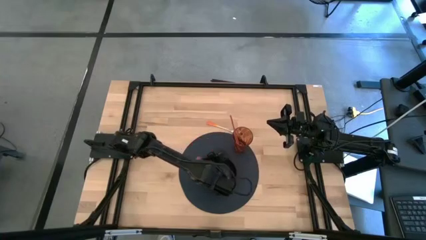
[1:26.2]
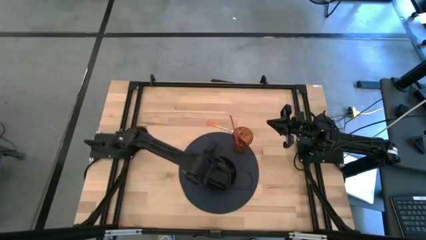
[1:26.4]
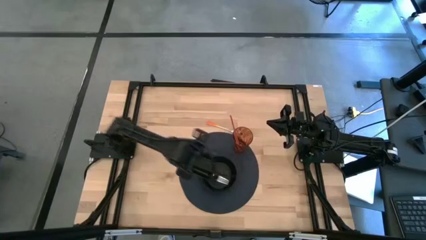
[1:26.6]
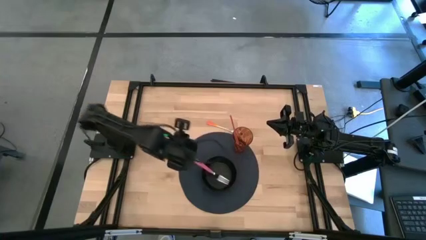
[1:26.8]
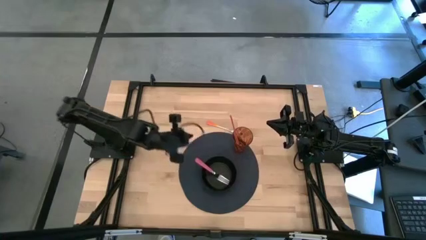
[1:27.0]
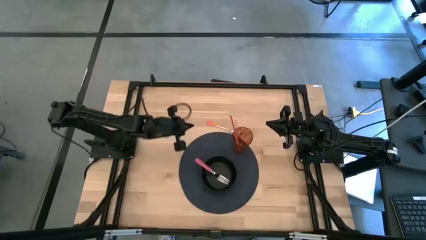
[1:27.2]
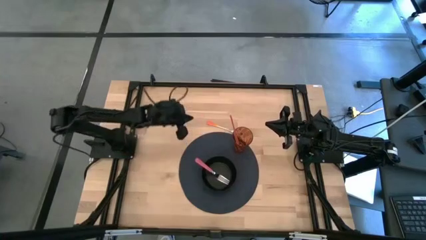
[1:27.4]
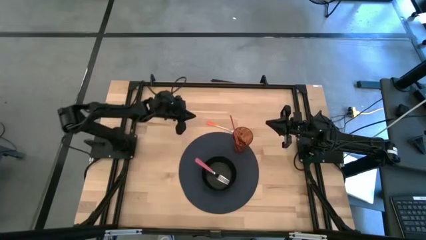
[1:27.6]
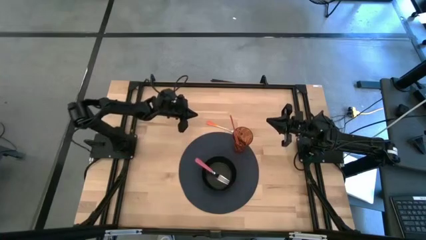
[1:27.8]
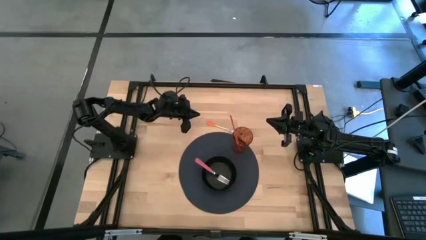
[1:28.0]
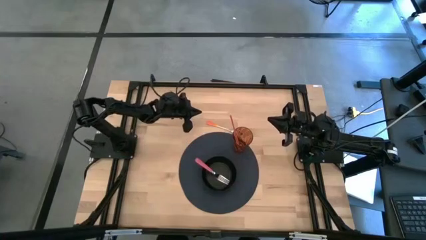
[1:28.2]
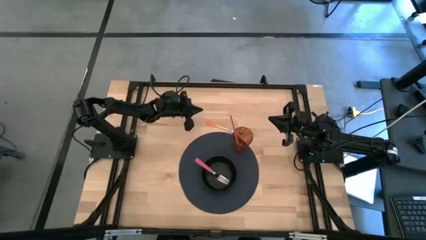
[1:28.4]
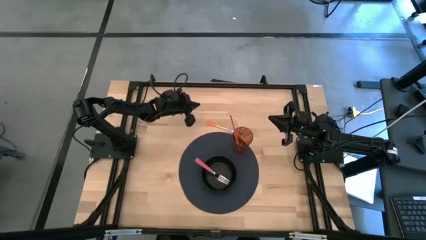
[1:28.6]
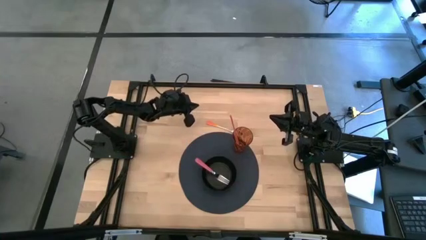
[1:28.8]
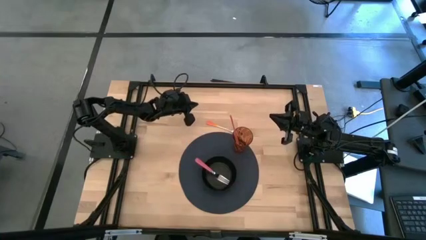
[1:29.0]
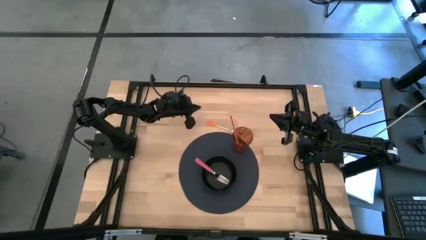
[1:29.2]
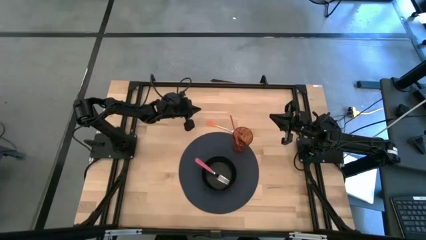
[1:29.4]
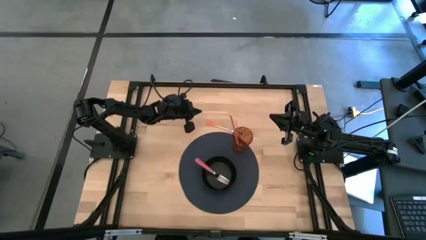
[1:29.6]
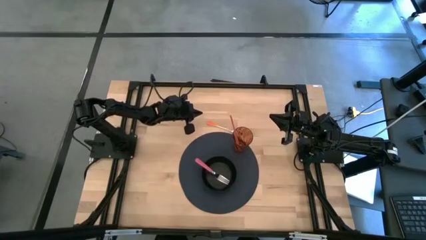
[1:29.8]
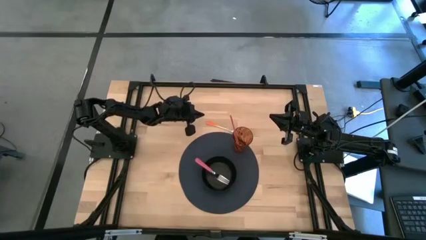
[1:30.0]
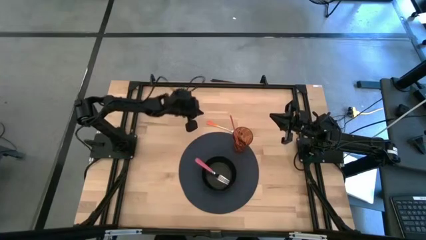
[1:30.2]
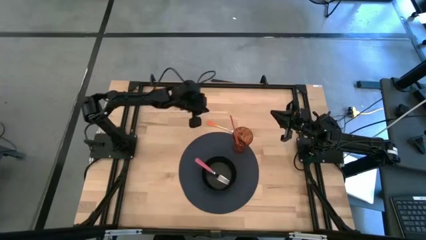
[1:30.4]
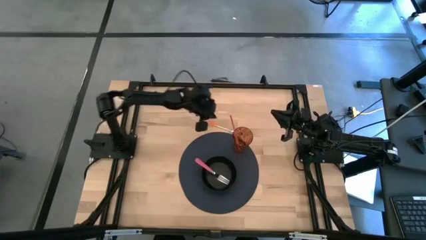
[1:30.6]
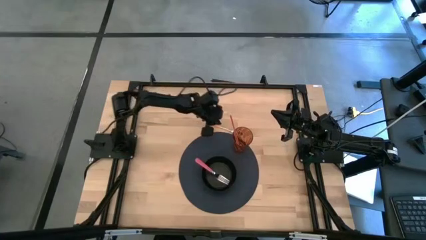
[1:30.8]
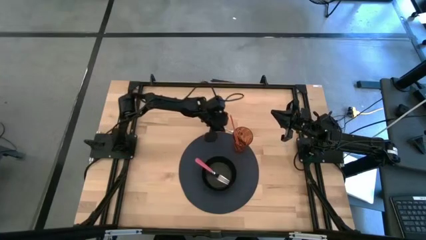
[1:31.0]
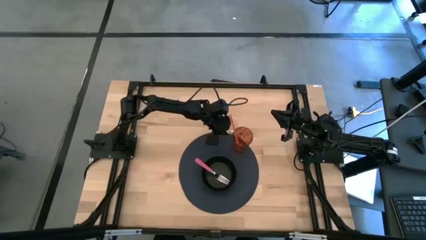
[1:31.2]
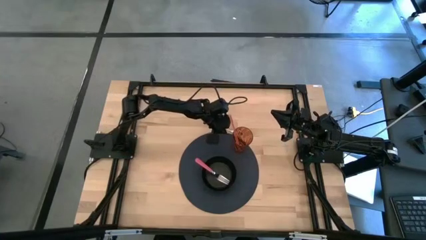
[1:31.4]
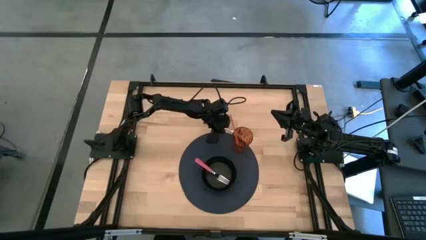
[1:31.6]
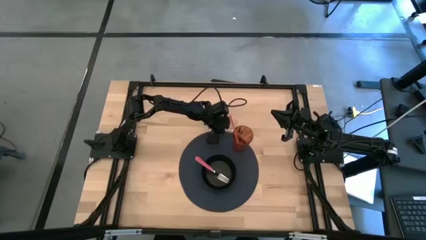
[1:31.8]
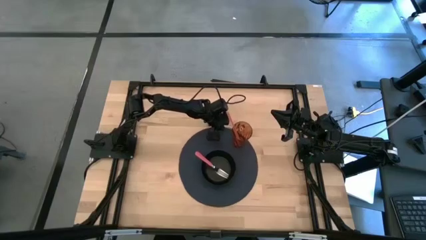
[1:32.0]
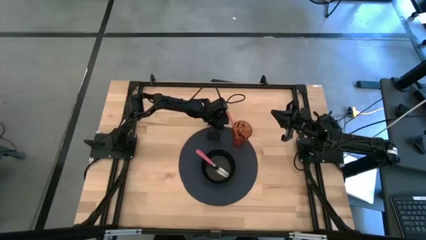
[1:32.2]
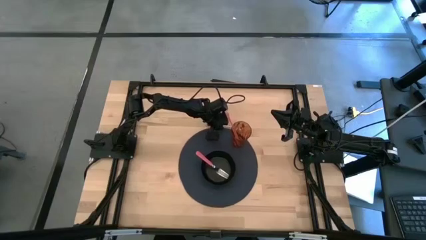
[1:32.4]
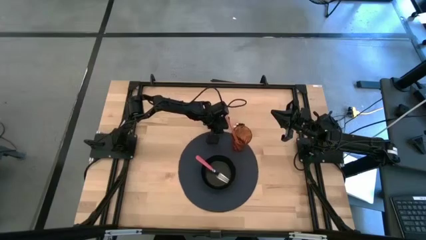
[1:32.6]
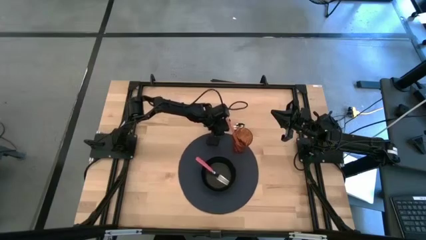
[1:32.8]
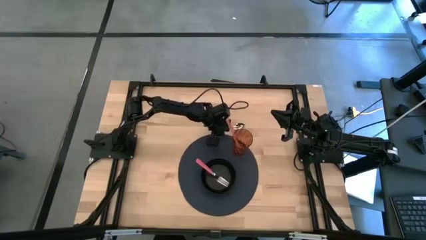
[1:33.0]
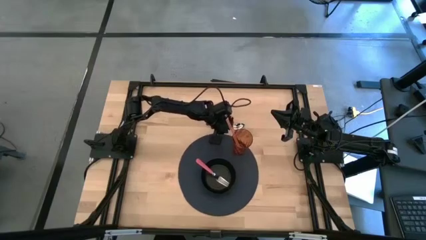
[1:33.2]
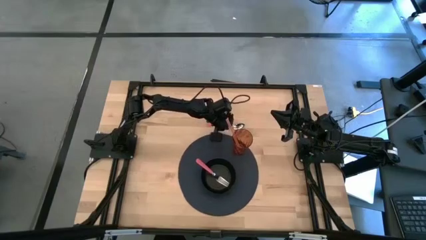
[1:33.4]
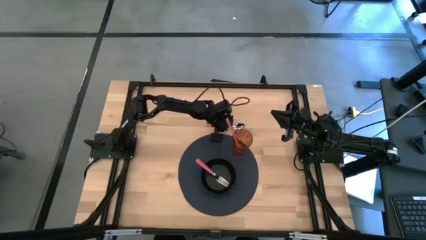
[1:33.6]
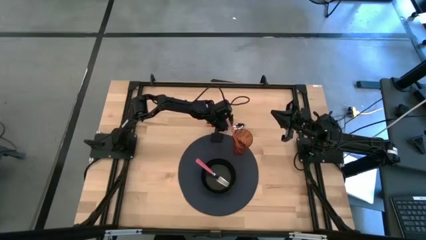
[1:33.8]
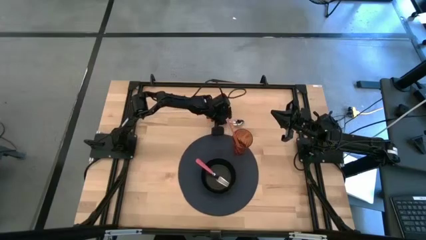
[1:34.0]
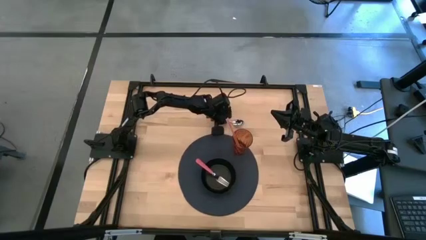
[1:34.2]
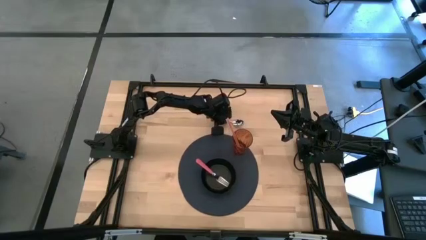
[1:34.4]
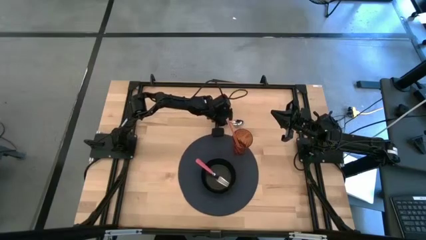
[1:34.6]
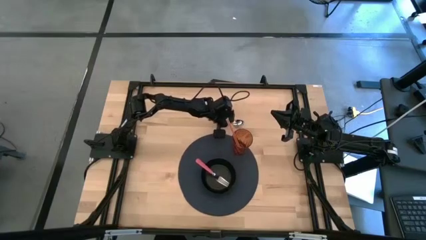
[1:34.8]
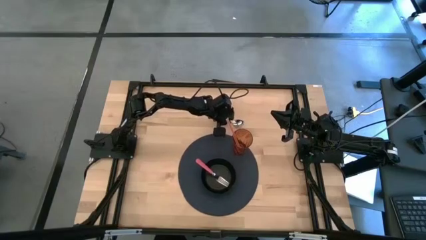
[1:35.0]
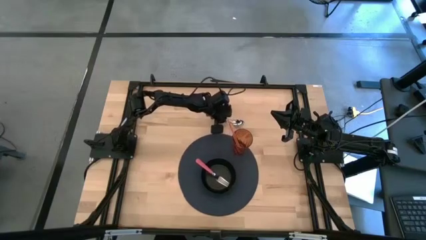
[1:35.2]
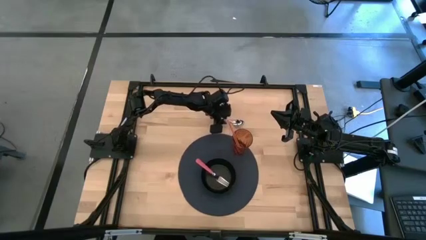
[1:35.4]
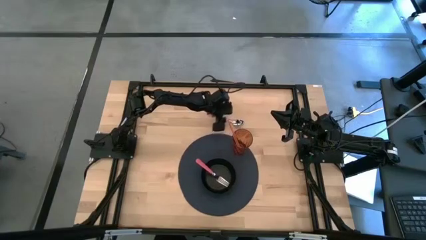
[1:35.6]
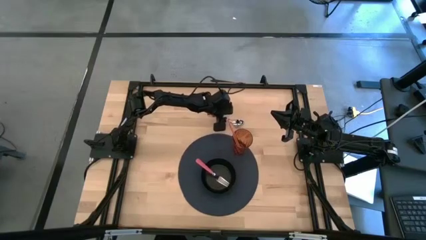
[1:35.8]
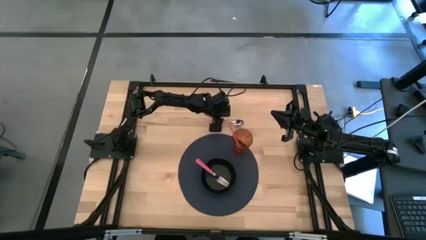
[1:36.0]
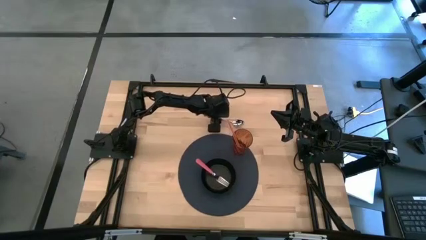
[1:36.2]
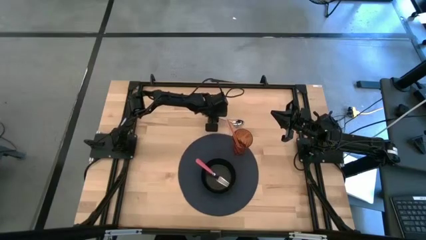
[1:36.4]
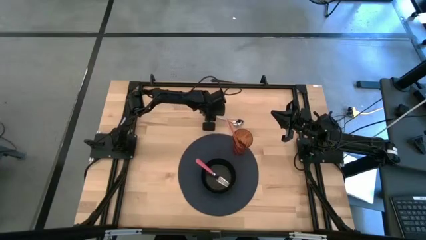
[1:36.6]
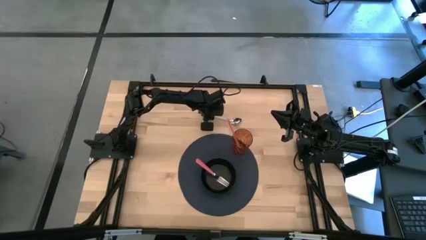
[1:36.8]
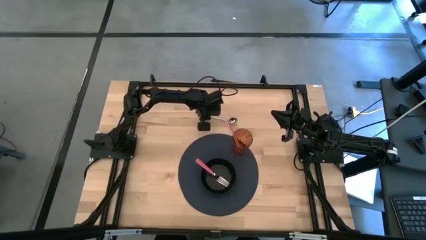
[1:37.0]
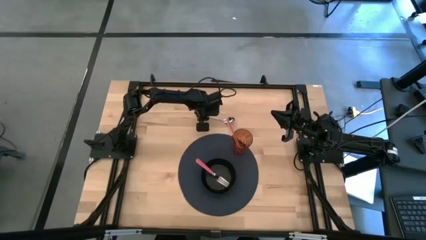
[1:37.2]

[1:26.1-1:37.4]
Task: Pick & Place Utensil
Put the orange spoon into the black bowl on the blue mat
